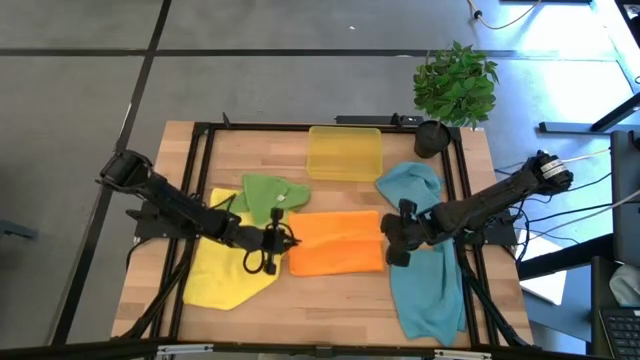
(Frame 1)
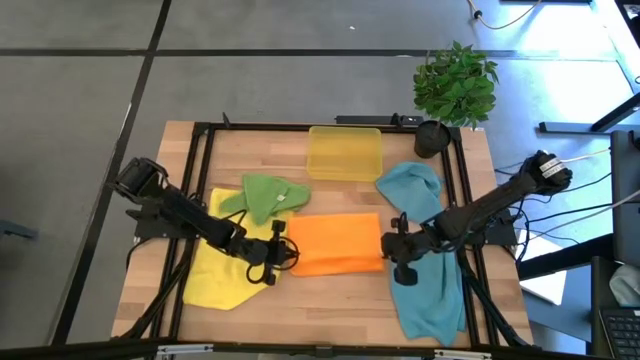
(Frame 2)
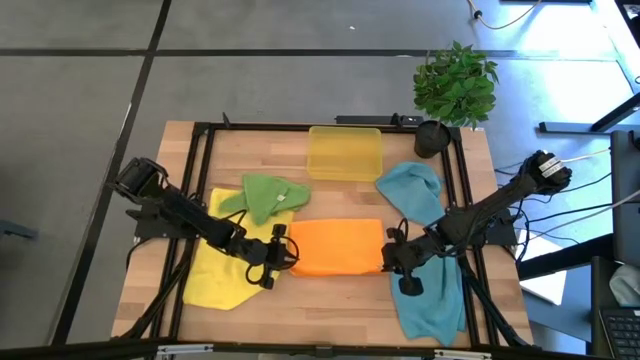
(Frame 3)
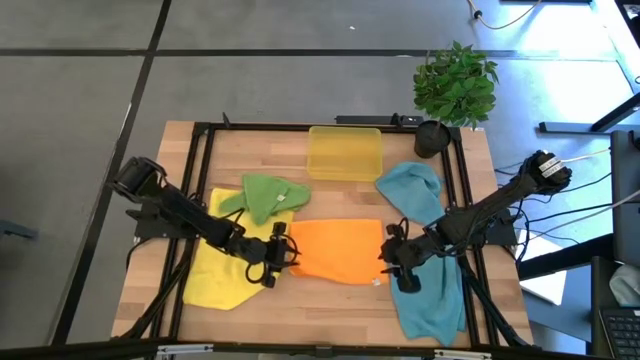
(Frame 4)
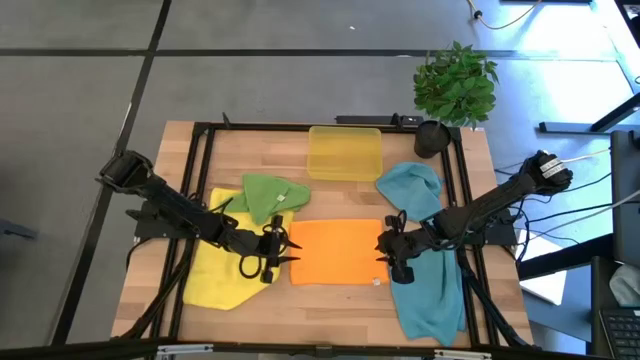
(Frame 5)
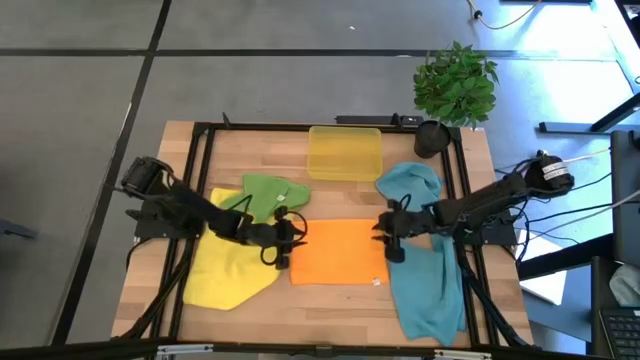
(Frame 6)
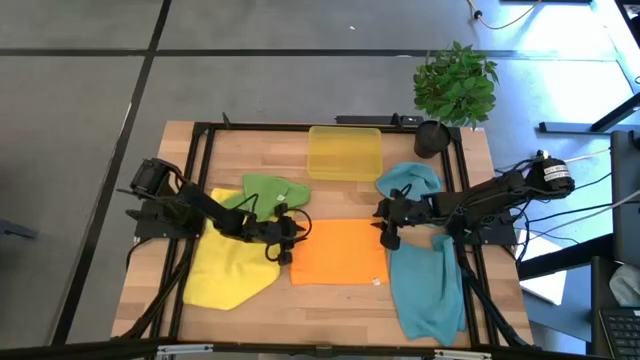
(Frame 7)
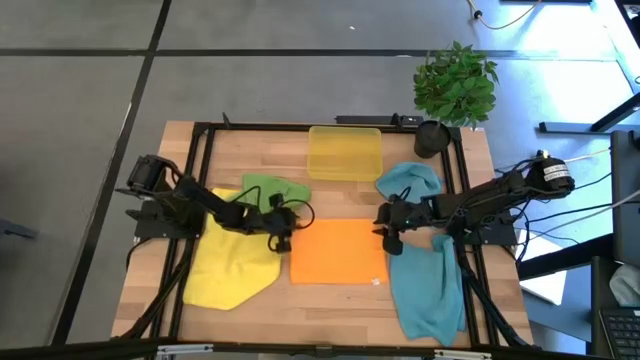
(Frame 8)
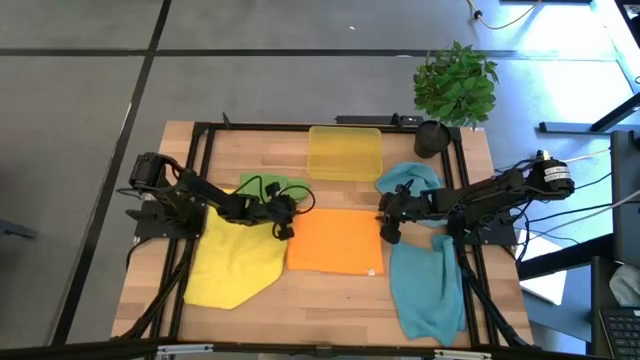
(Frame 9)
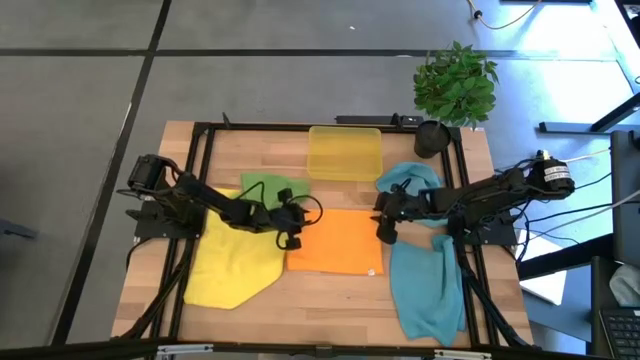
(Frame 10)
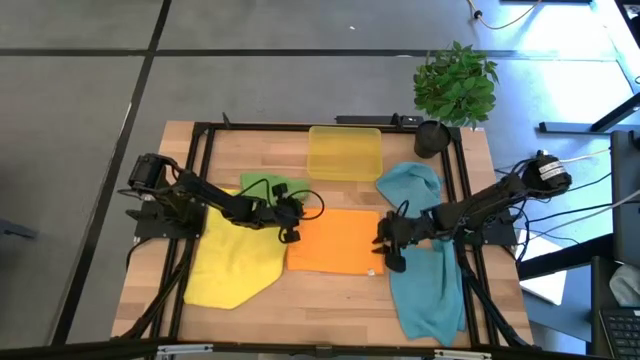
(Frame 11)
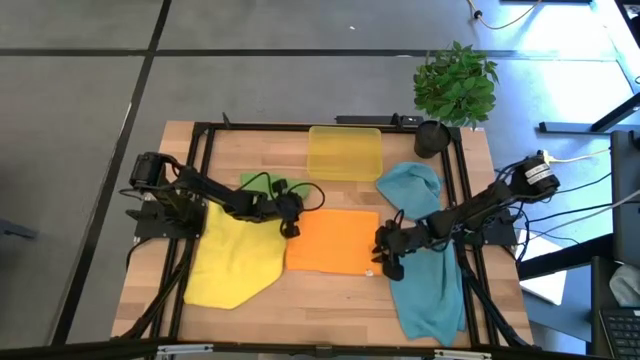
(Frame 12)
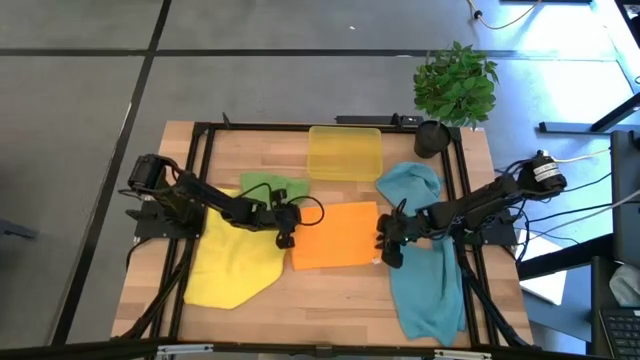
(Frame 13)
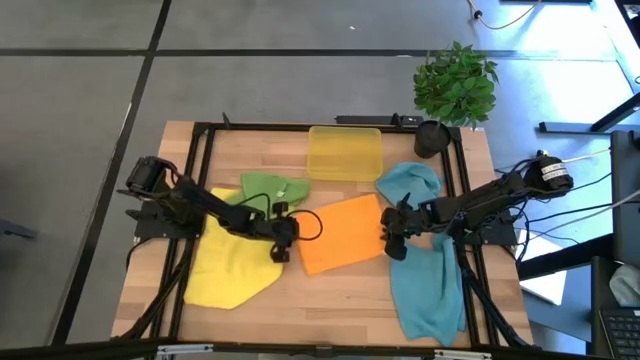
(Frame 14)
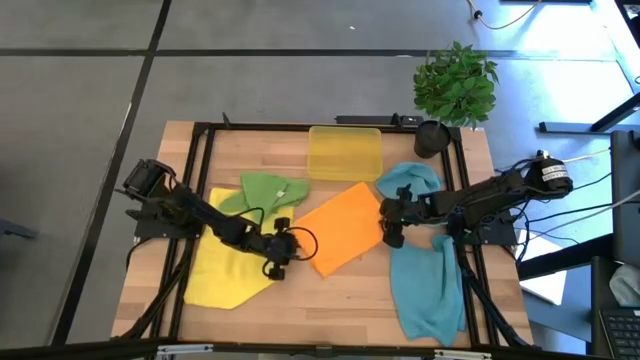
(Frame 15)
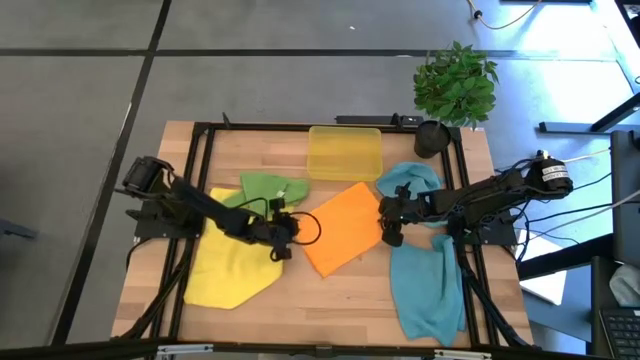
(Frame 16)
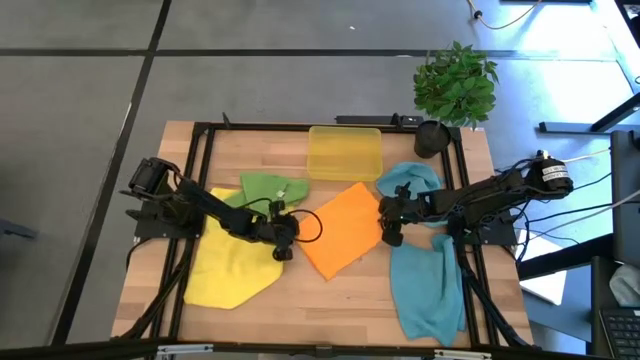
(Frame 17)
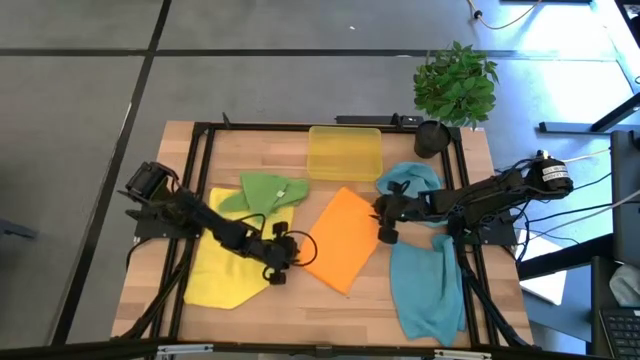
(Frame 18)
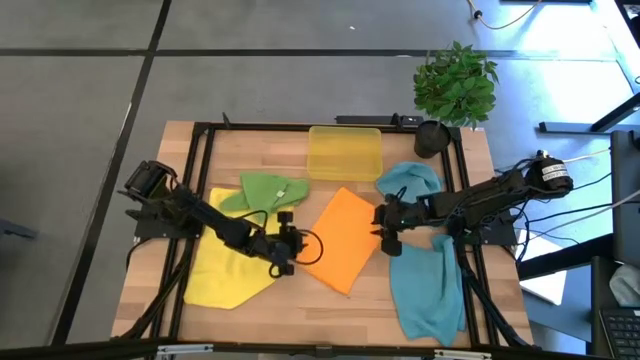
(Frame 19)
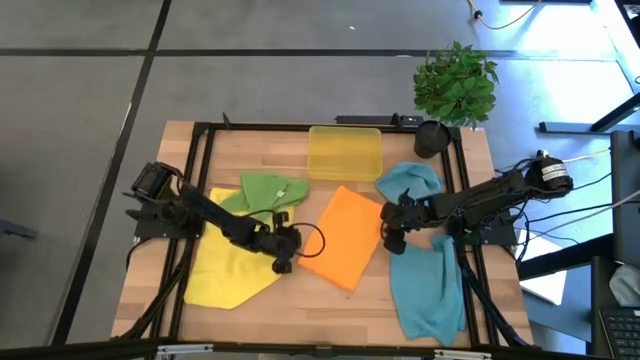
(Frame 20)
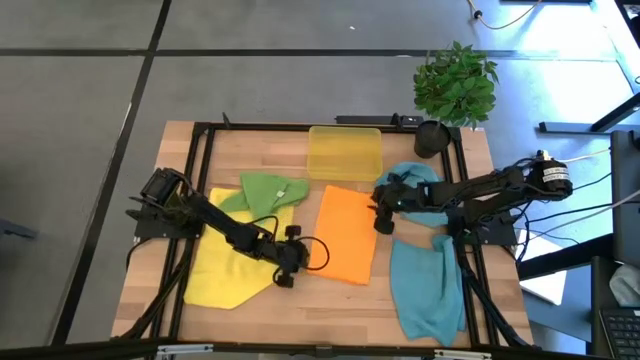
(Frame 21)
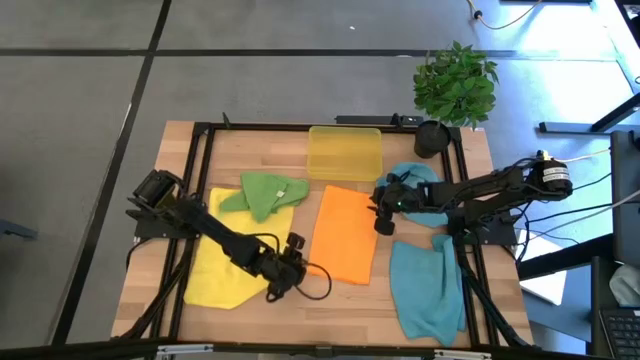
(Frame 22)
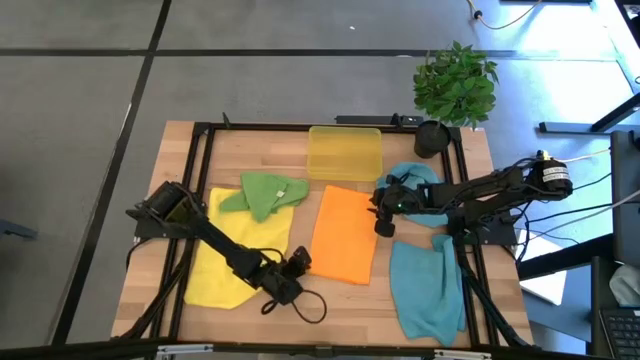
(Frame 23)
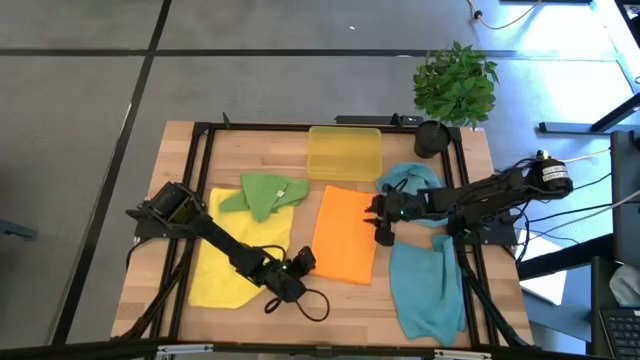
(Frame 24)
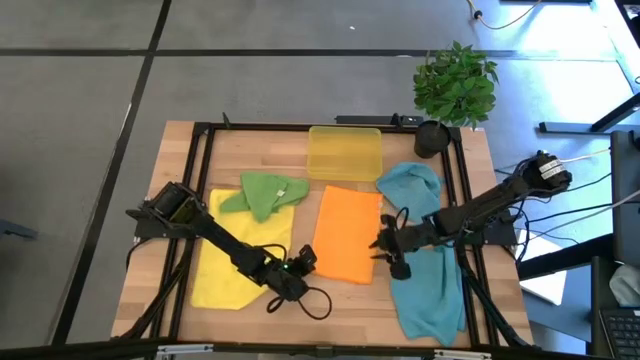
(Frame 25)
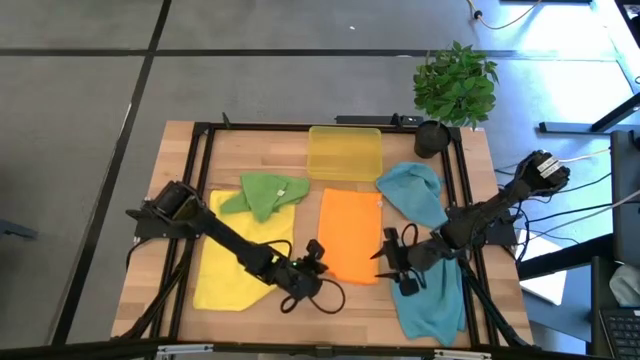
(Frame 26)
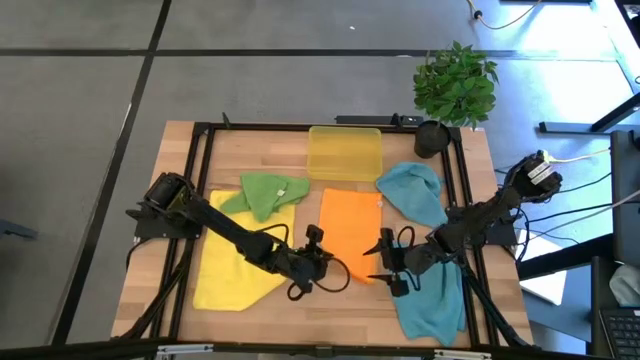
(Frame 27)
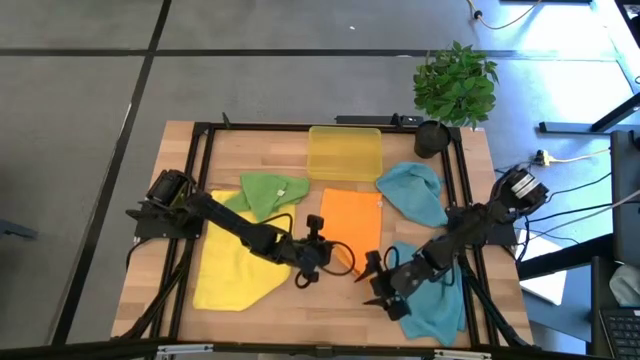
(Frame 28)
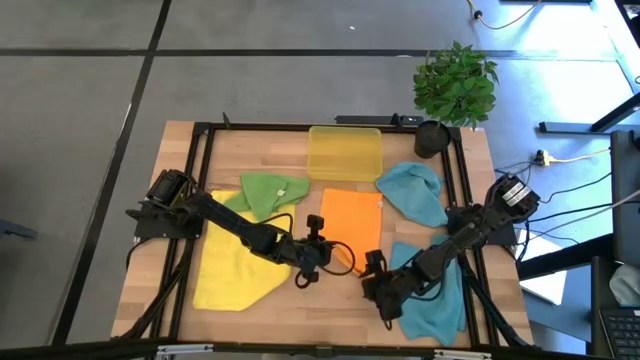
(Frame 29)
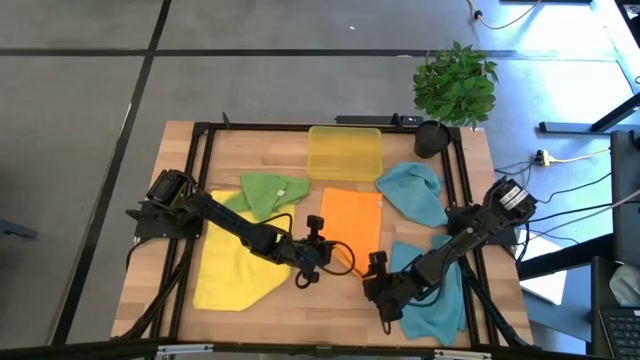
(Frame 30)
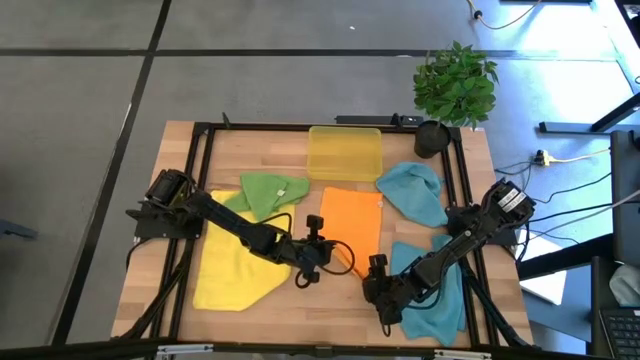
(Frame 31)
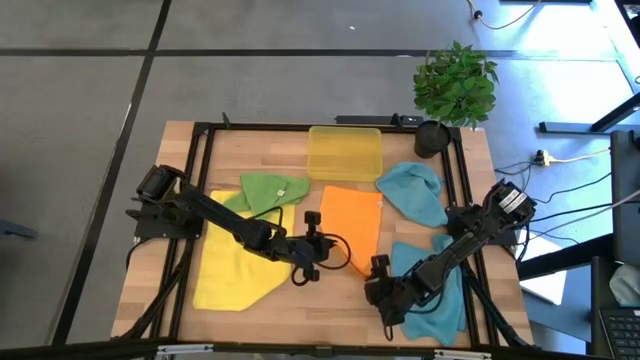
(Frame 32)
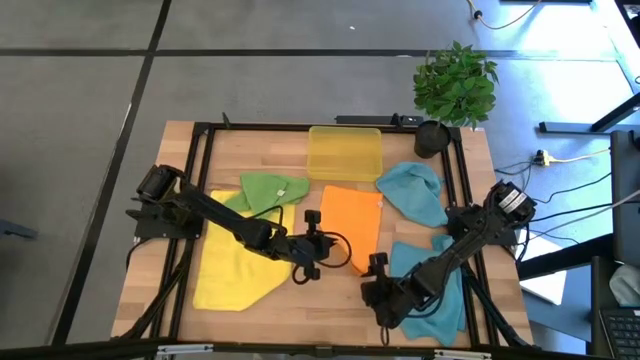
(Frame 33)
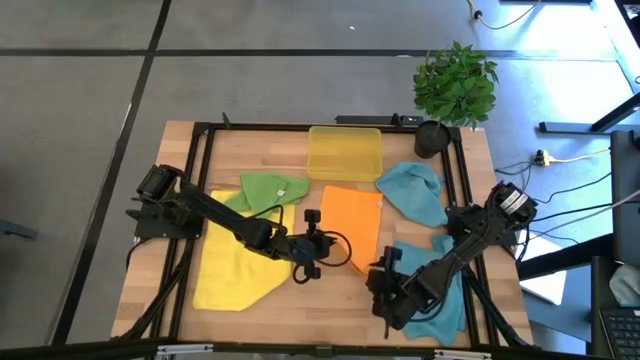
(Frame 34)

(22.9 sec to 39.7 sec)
Task: Fold microfiber towels
Fold the orange microfiber cloth

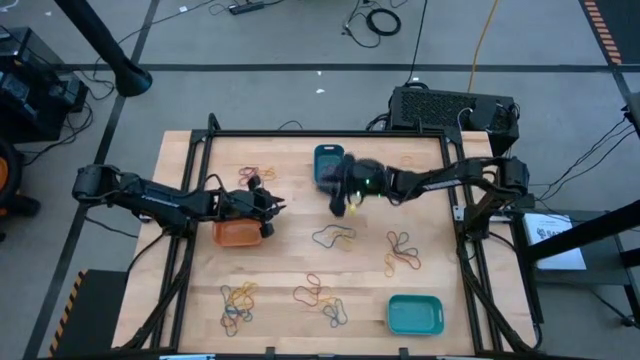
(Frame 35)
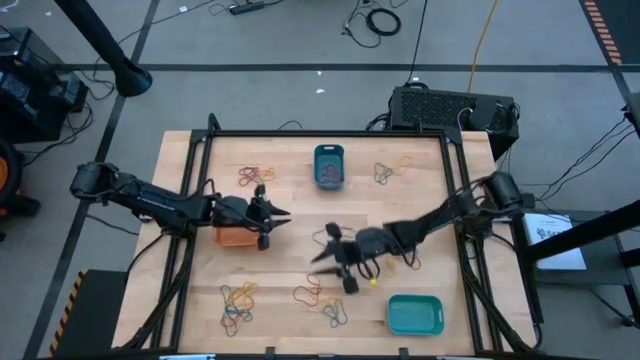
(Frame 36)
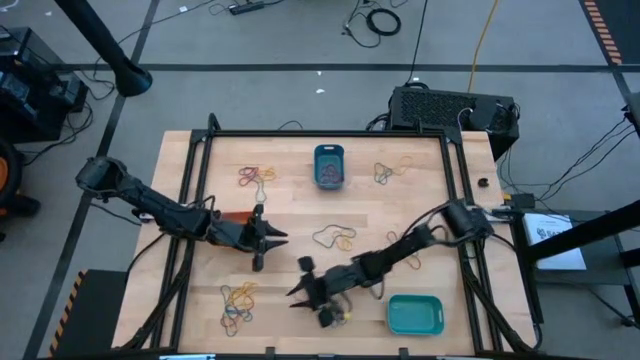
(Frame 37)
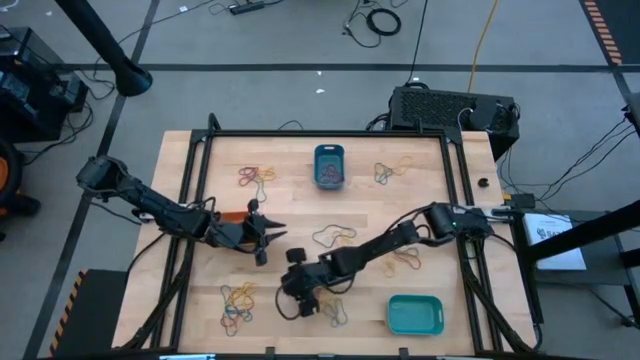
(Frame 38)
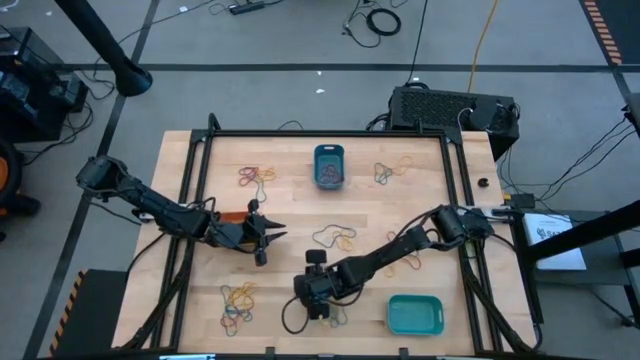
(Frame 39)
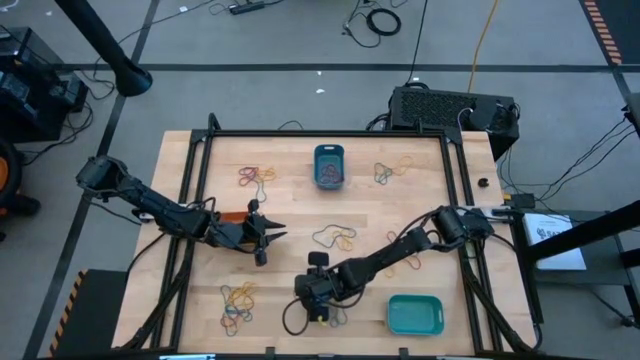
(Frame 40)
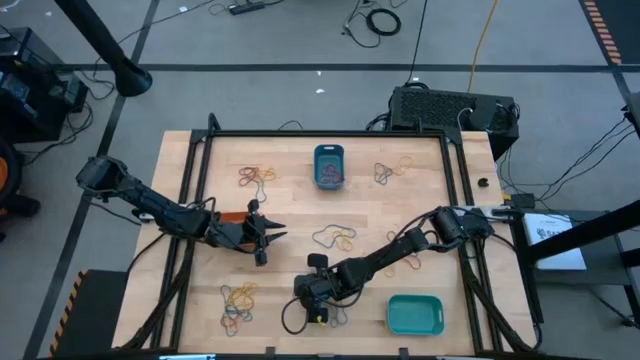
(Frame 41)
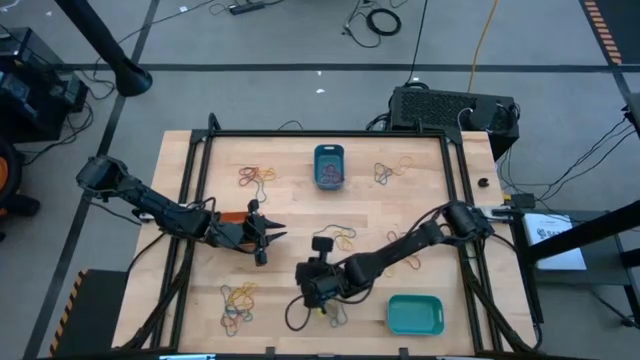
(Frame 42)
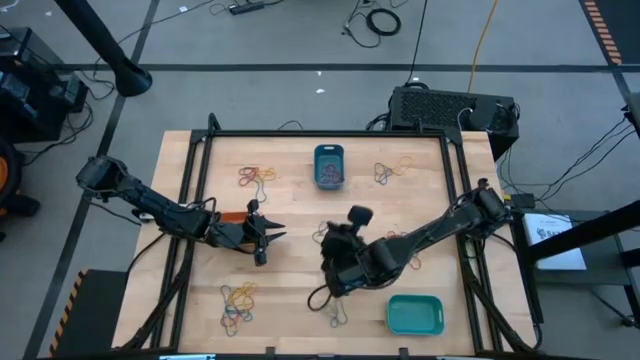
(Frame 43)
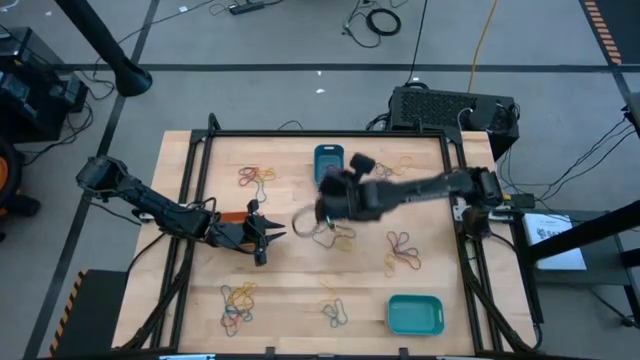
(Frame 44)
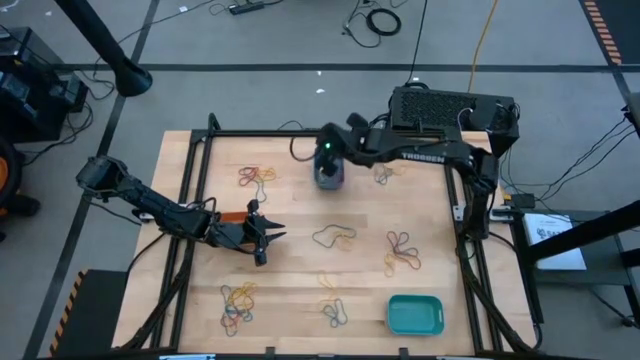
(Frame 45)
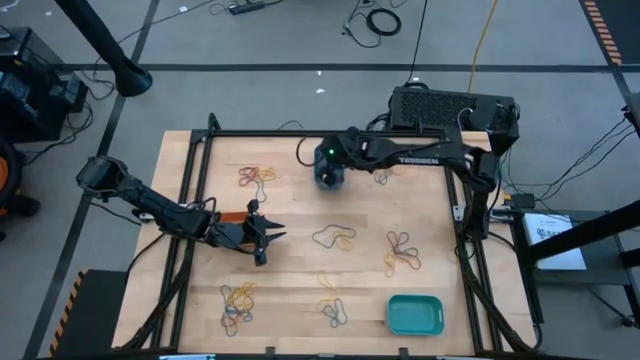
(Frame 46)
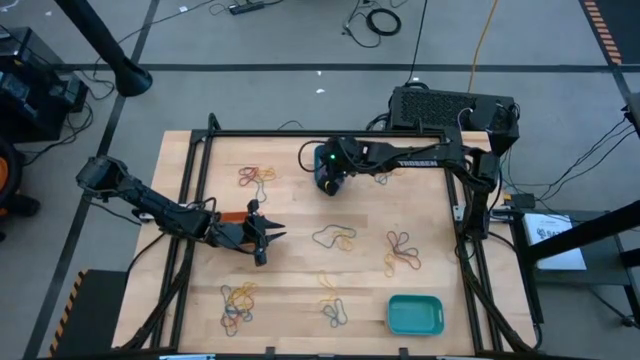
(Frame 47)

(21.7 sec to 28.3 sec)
Task: Sort rubber bands into baskets
Put the bottom center red rubber band into the blue bin
